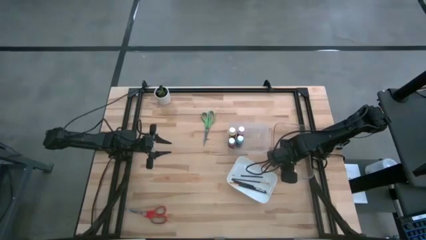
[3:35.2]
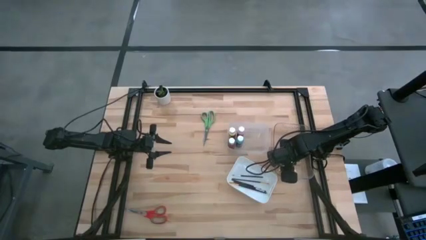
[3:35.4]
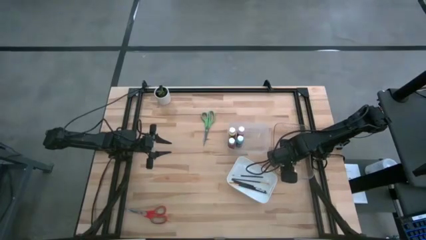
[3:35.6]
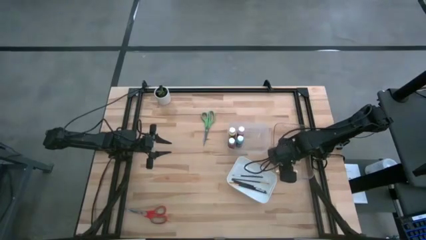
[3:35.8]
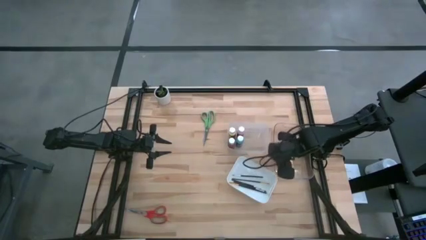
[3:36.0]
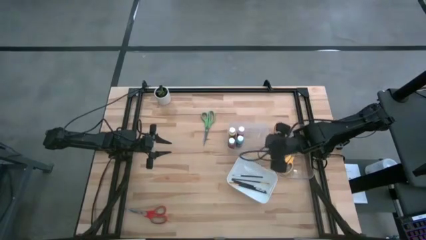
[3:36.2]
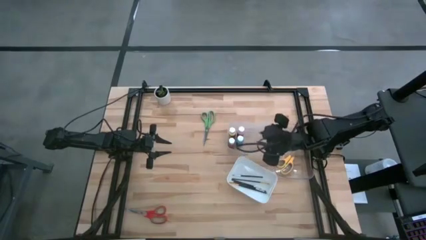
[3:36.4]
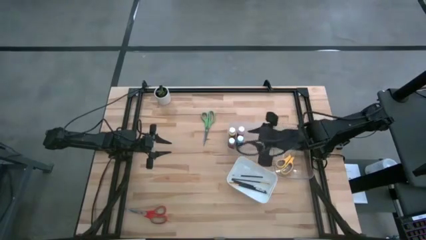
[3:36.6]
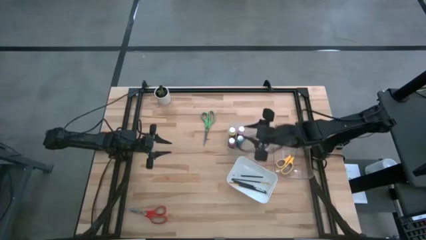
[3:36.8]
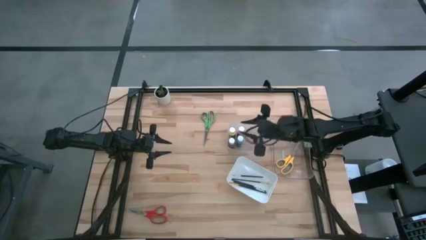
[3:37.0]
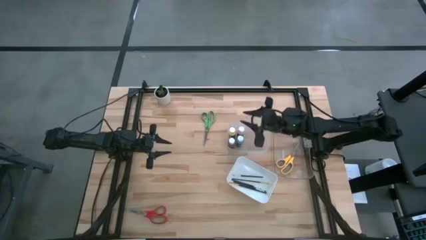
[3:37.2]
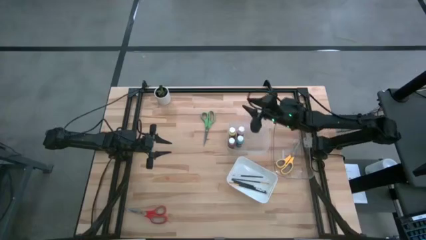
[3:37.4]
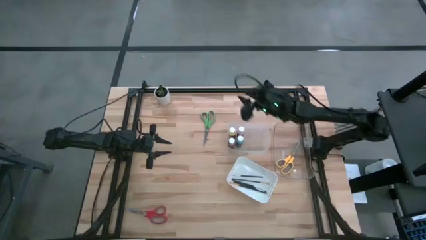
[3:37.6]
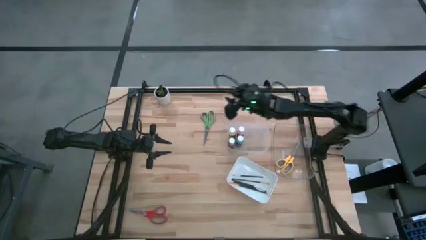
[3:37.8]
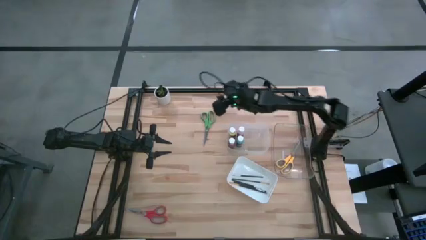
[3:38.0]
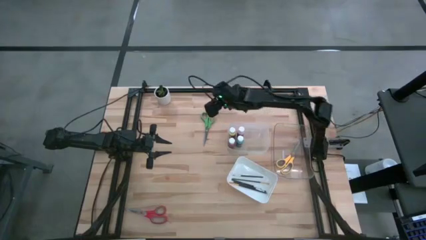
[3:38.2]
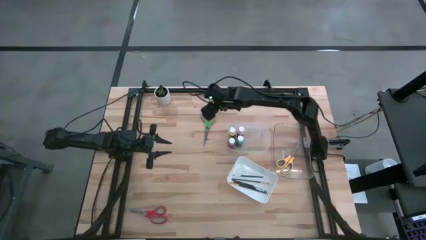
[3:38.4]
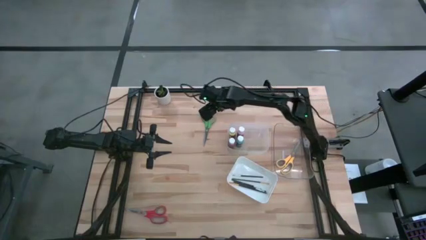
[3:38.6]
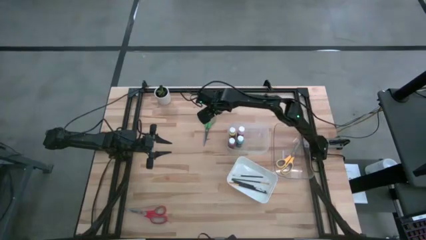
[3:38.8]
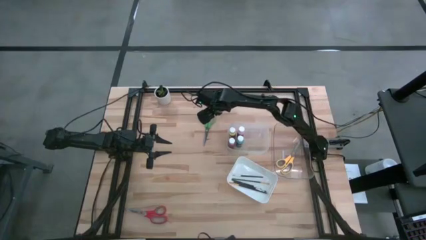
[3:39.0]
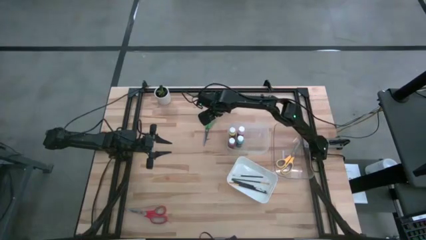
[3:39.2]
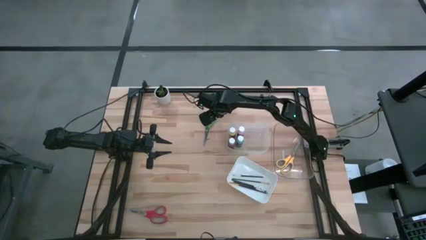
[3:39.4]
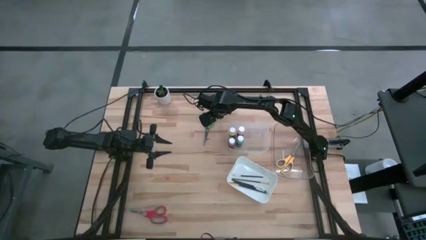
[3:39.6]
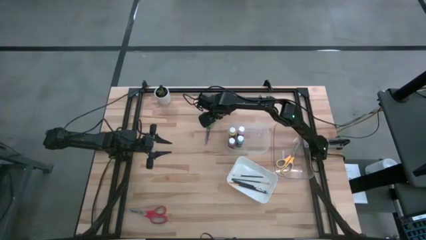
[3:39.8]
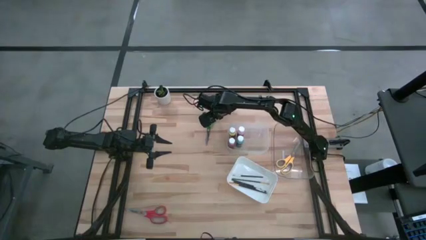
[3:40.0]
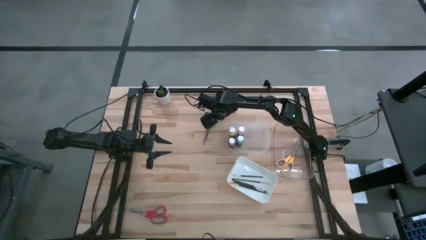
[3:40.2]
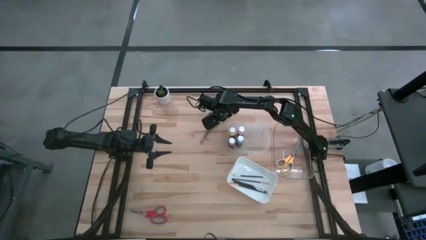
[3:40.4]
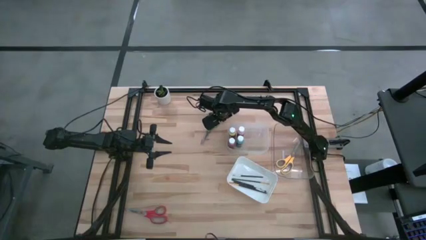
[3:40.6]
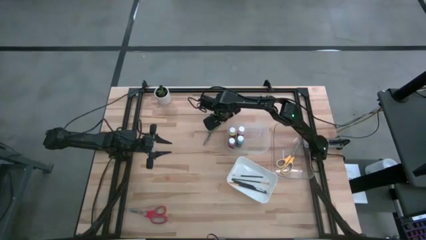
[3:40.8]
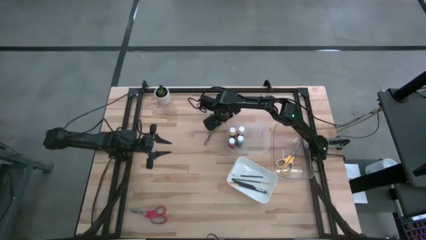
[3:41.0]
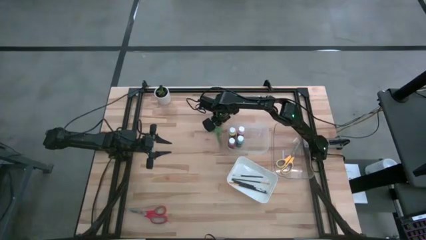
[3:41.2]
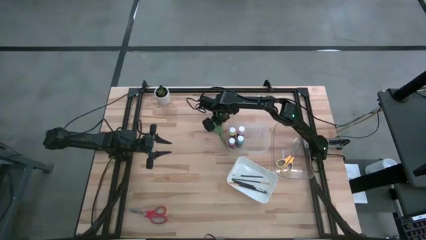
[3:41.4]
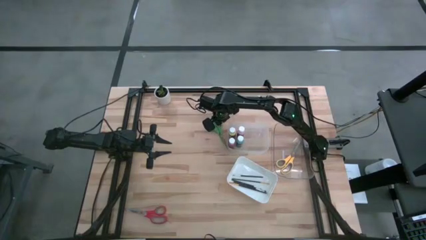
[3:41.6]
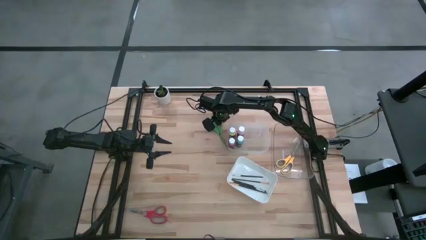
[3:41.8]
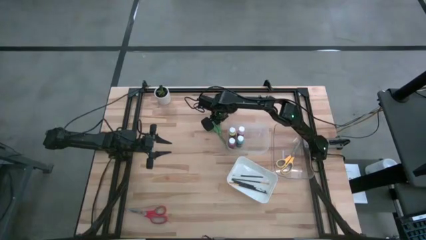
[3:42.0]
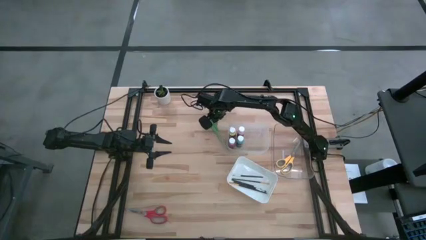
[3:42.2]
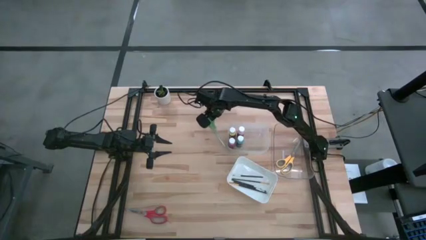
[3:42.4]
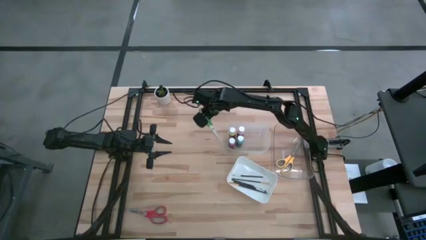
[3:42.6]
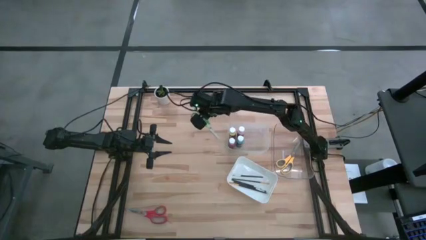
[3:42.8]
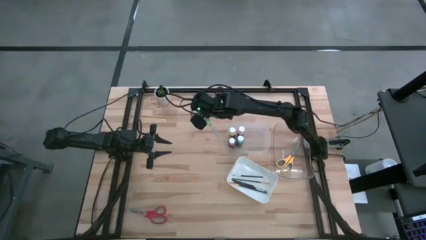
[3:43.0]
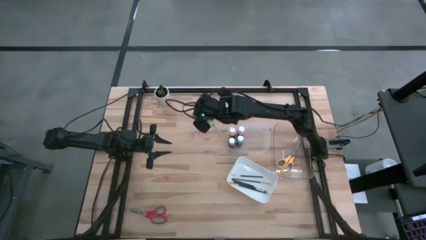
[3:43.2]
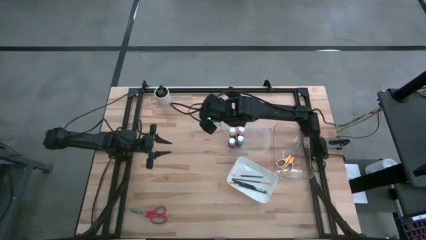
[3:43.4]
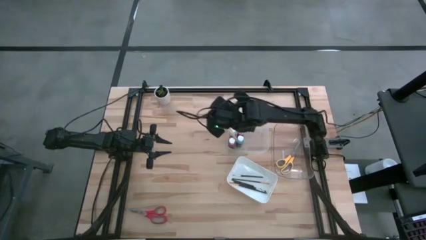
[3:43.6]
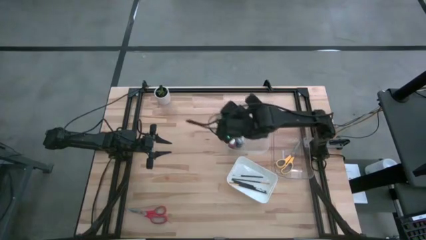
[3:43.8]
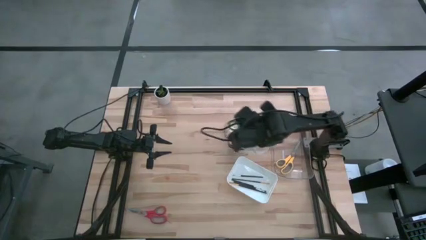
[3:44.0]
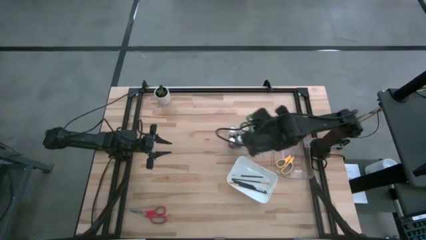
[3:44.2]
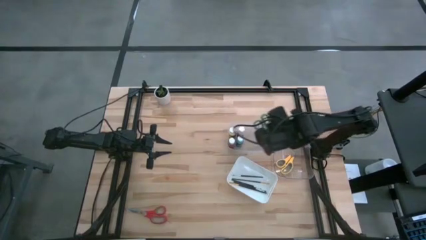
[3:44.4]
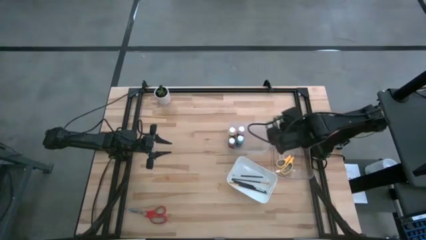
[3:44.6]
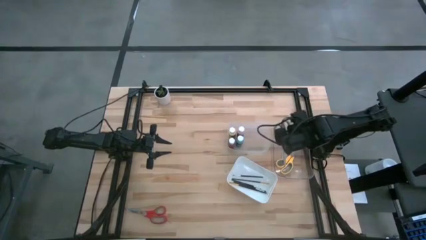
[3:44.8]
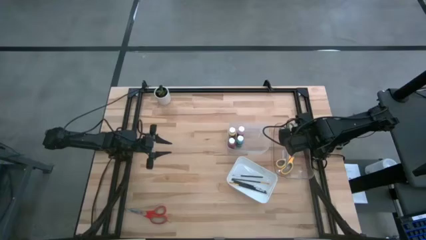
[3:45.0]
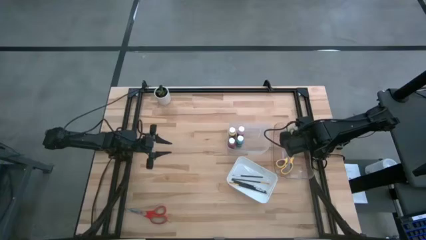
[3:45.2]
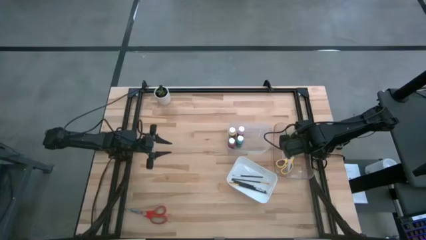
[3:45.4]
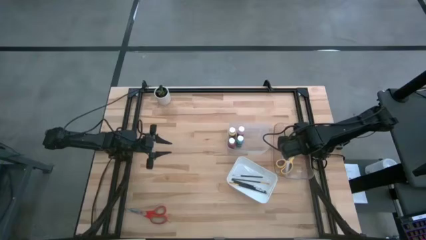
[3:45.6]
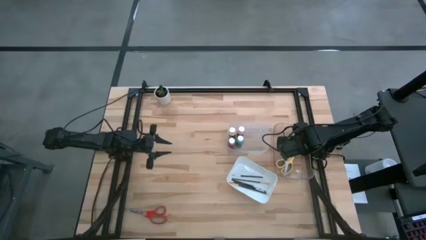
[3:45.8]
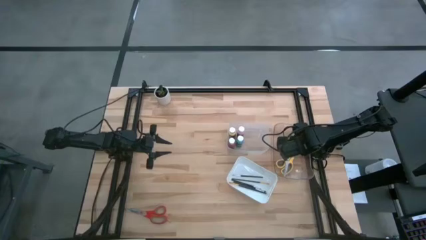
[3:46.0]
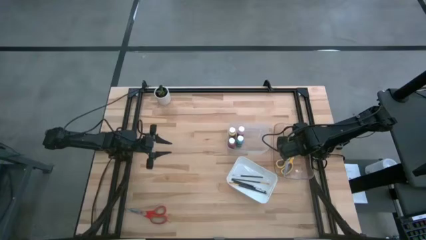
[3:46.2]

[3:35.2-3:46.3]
Task: Pick & Place Paint Supplies
Put the green scissors into the right transparent bin

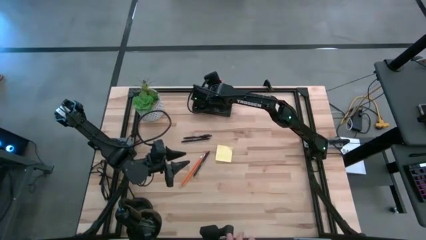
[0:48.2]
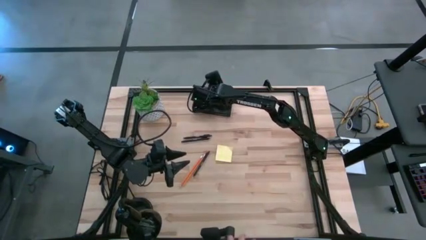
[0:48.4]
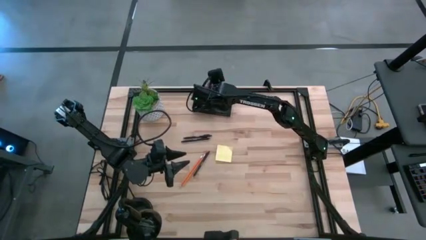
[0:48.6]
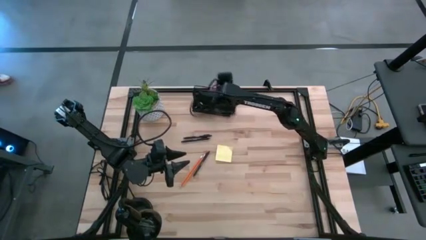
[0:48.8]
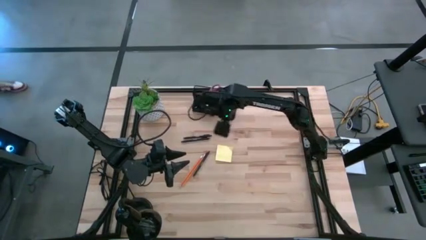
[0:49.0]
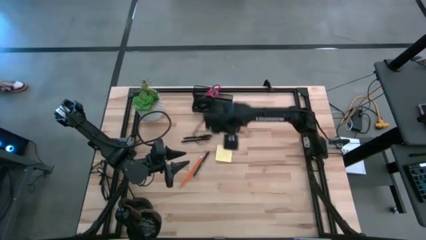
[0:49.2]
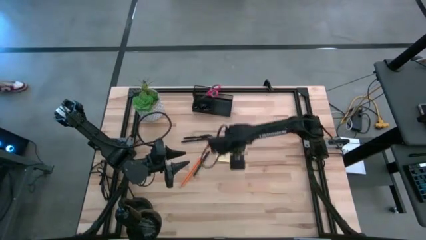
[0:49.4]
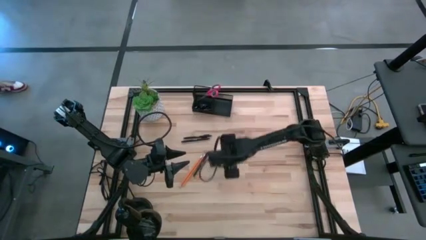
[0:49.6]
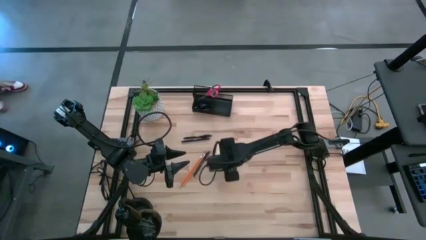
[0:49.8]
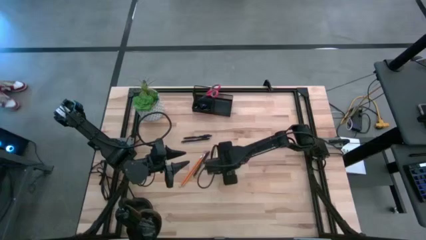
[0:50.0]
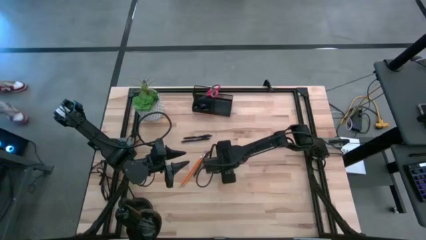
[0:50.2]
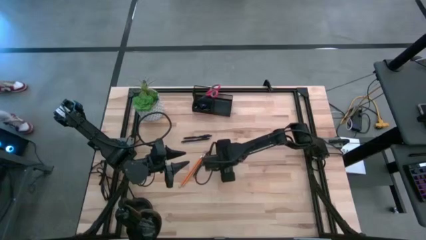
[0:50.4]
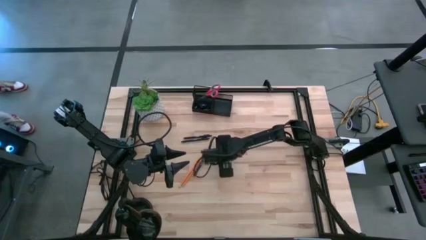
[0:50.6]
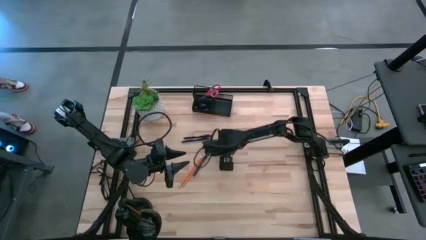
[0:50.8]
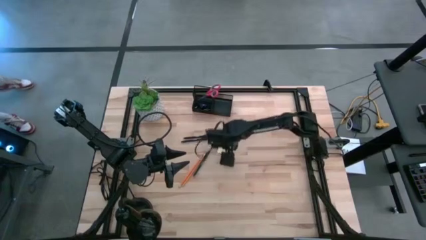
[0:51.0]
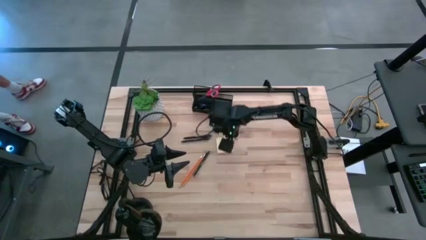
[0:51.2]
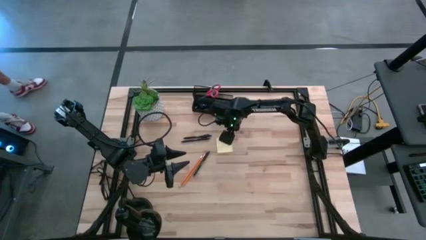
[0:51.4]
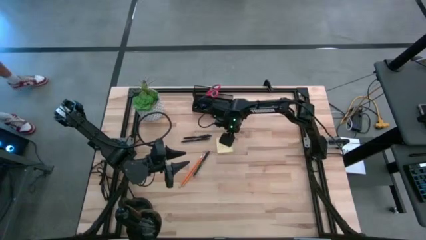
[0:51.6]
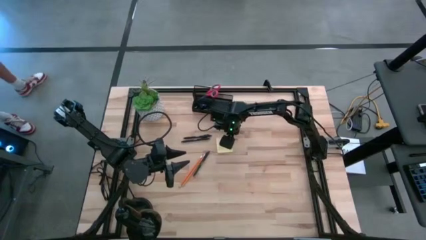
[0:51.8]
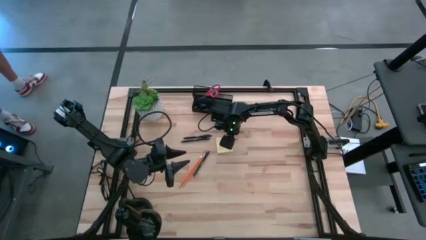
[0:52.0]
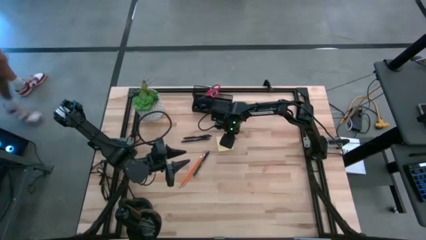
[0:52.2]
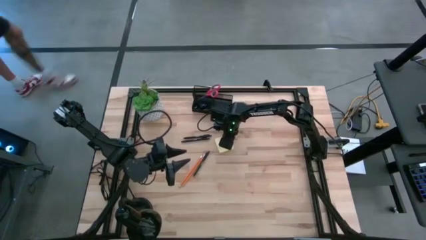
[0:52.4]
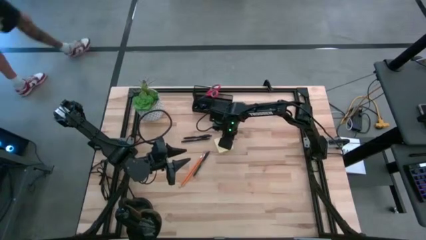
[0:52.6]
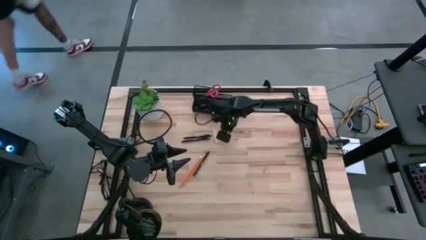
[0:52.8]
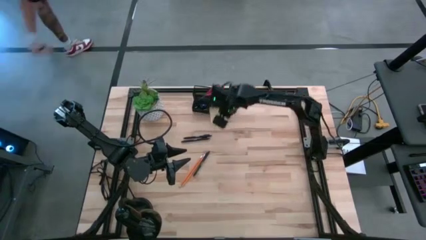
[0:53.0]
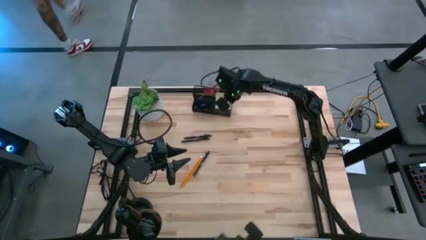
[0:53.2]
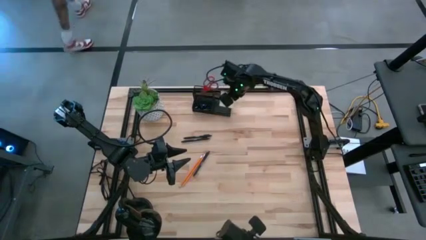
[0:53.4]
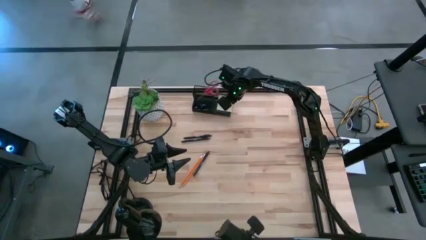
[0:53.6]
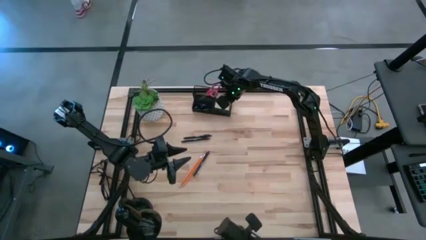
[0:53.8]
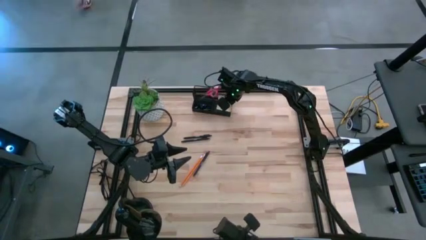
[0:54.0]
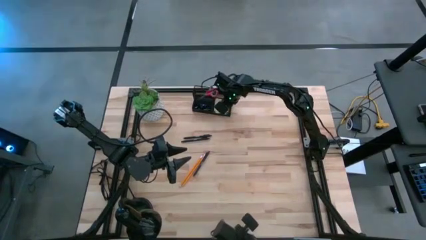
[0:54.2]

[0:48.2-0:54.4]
Task: Pick and place office supplies into organizer
Put the sticky note into the right section of the black desk organizer
